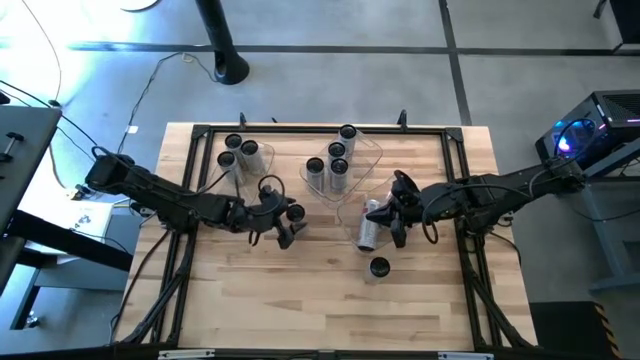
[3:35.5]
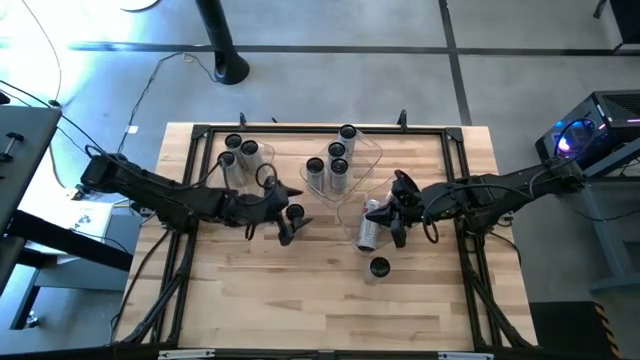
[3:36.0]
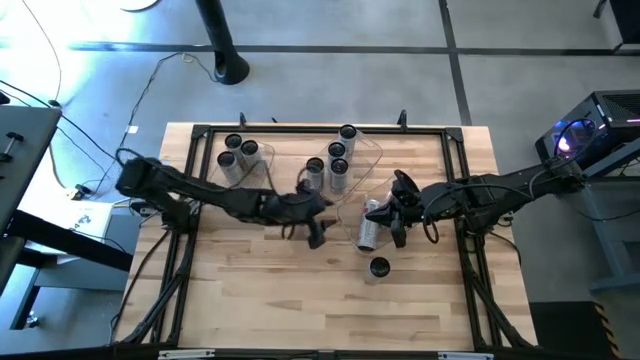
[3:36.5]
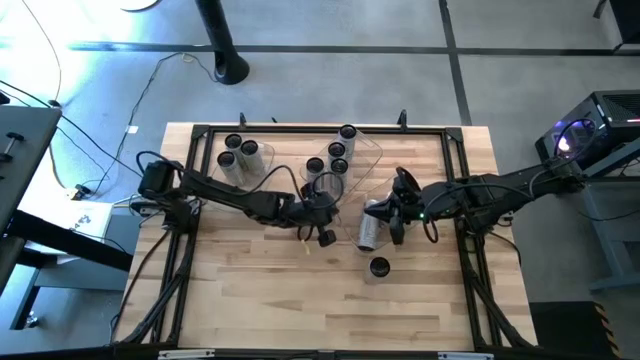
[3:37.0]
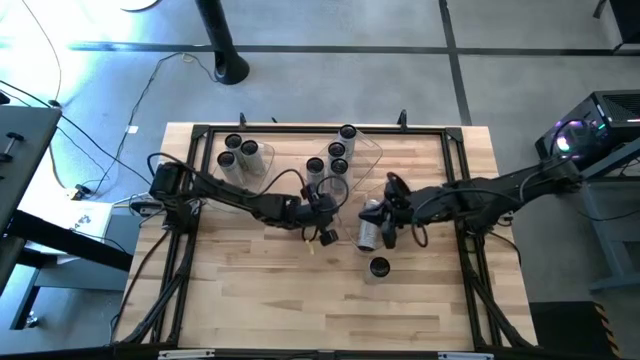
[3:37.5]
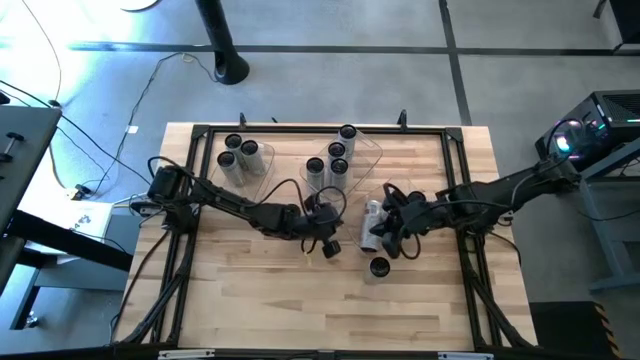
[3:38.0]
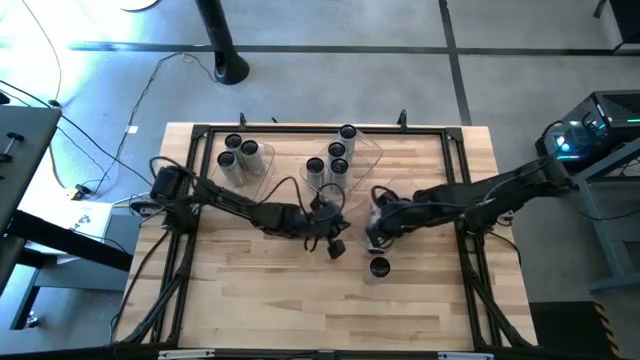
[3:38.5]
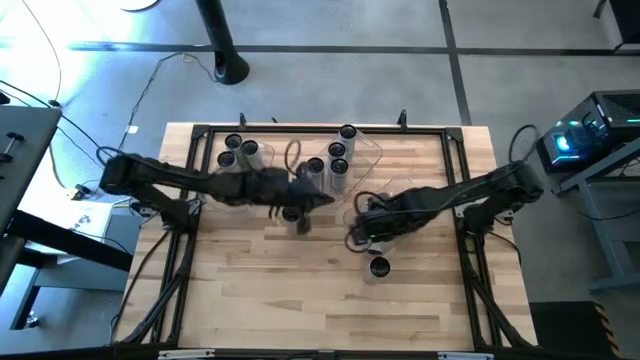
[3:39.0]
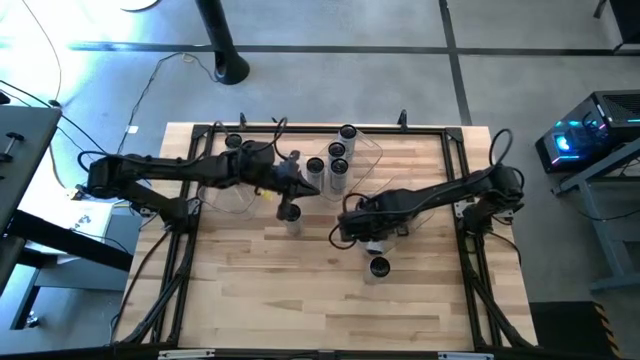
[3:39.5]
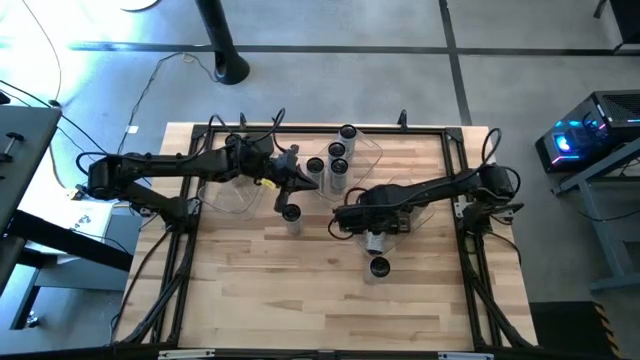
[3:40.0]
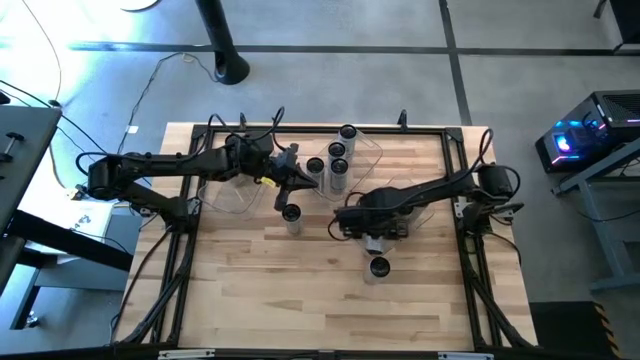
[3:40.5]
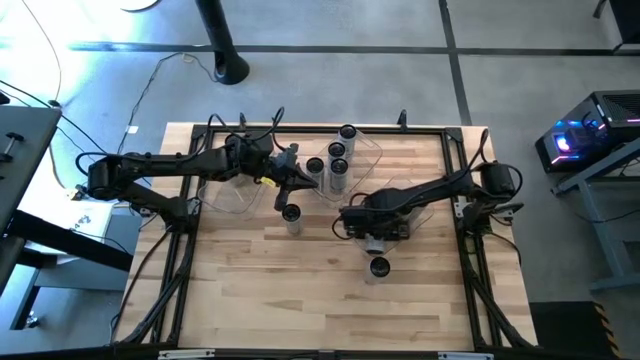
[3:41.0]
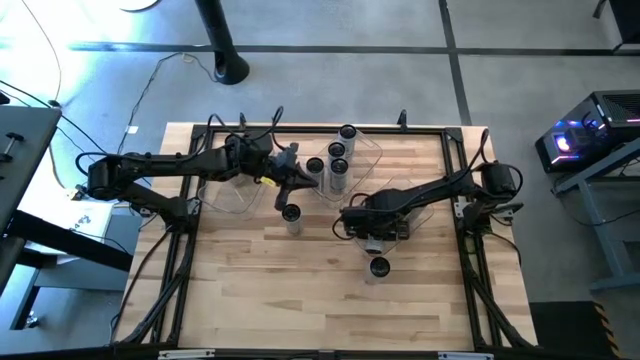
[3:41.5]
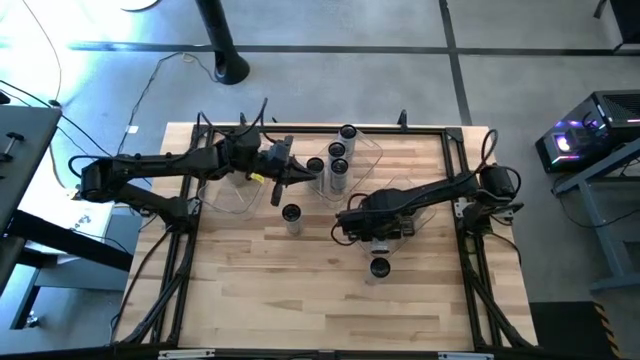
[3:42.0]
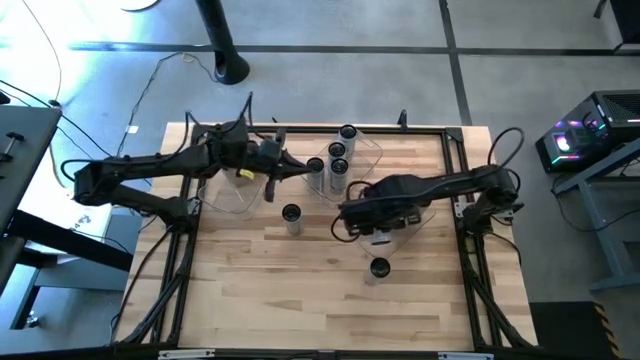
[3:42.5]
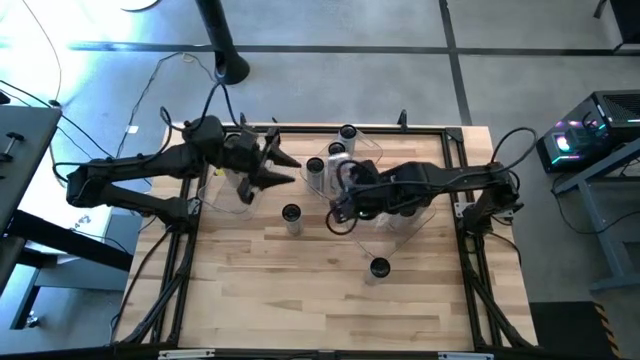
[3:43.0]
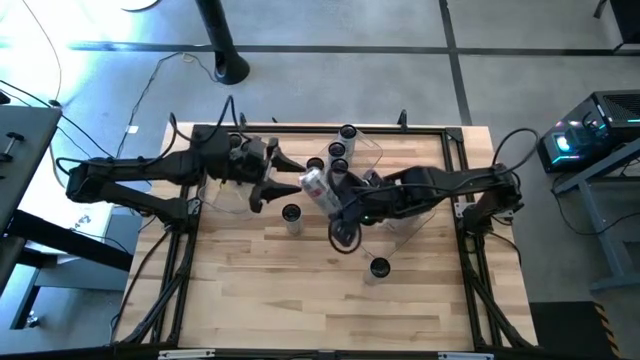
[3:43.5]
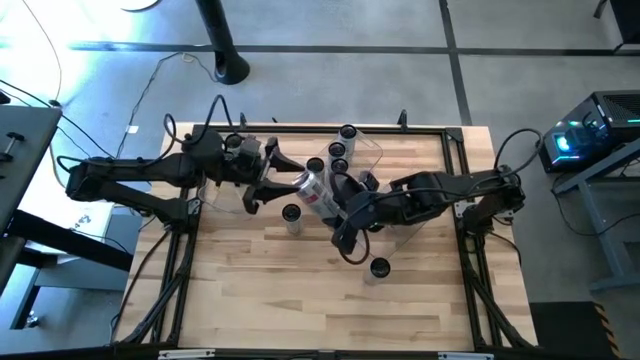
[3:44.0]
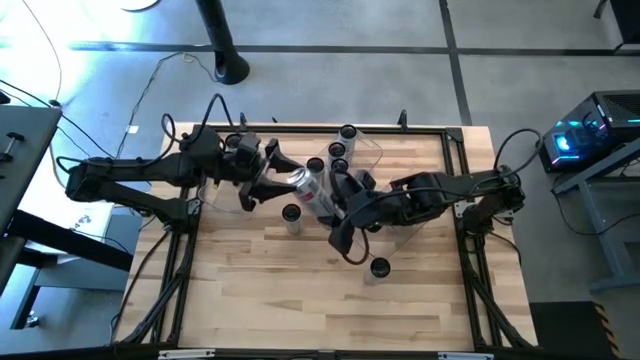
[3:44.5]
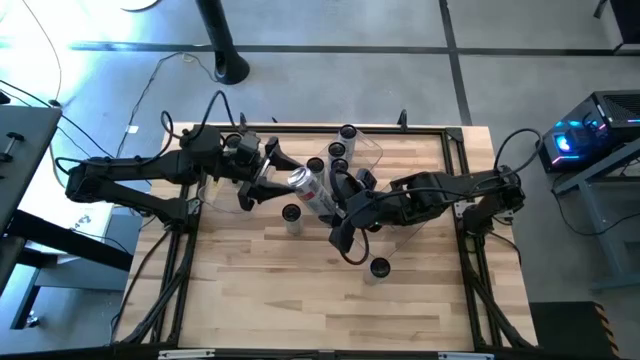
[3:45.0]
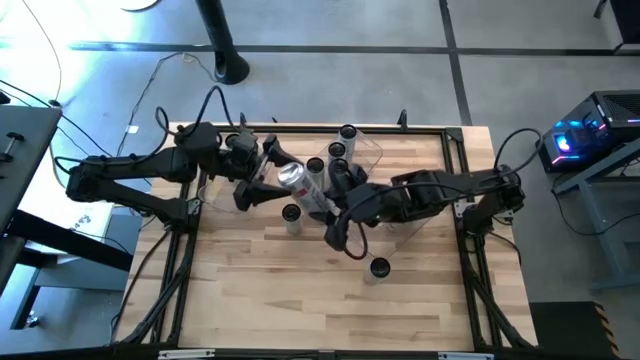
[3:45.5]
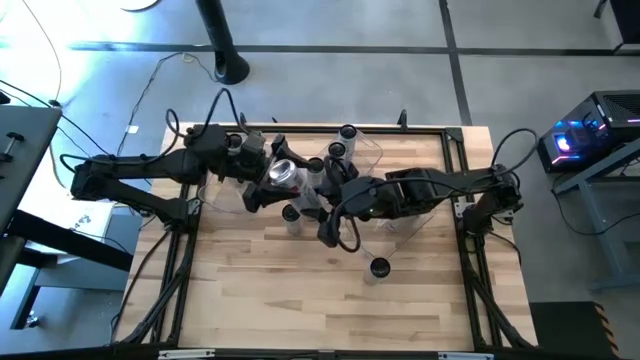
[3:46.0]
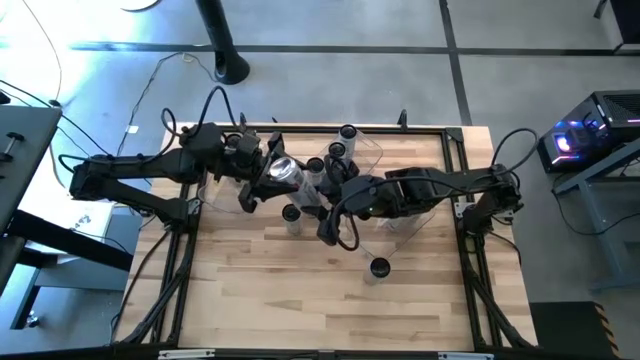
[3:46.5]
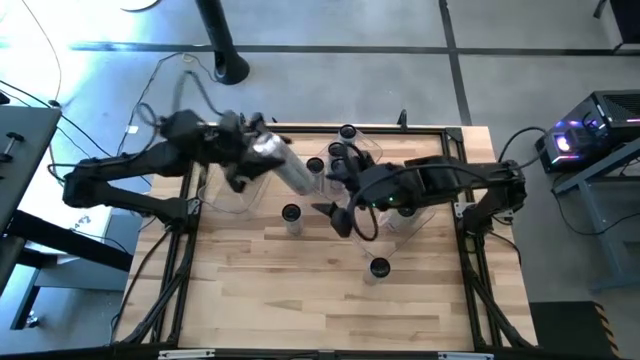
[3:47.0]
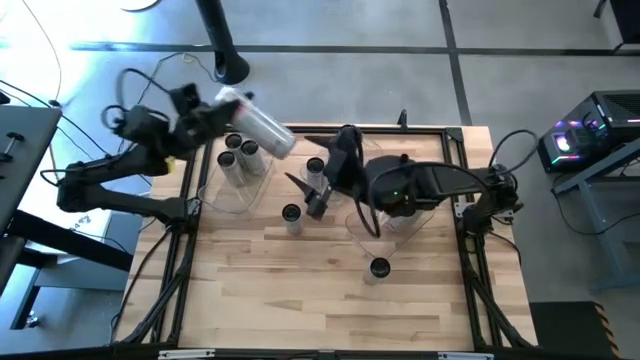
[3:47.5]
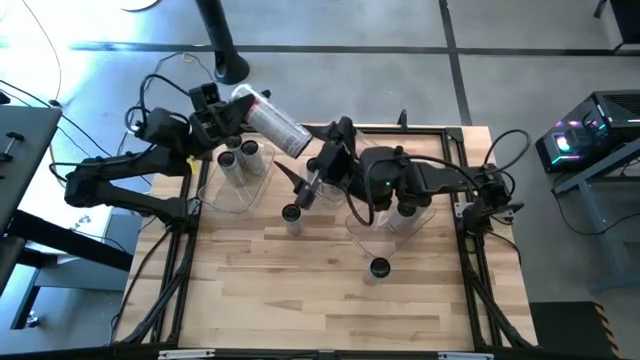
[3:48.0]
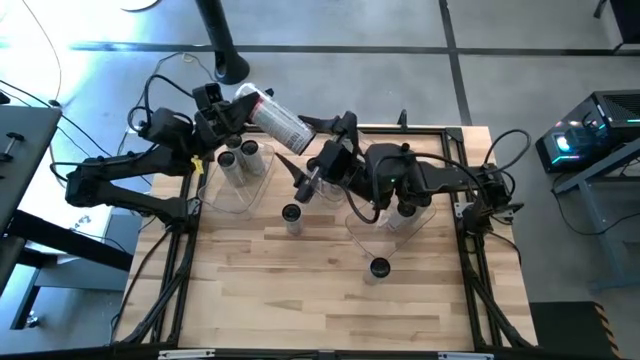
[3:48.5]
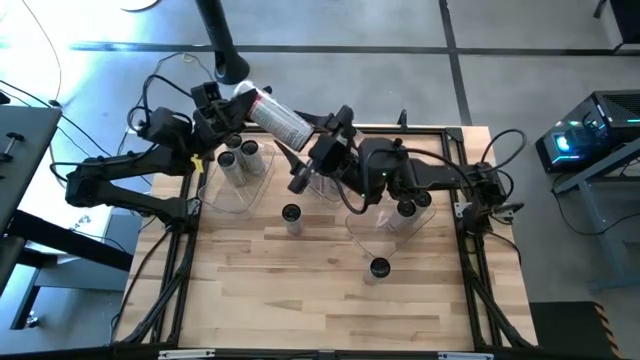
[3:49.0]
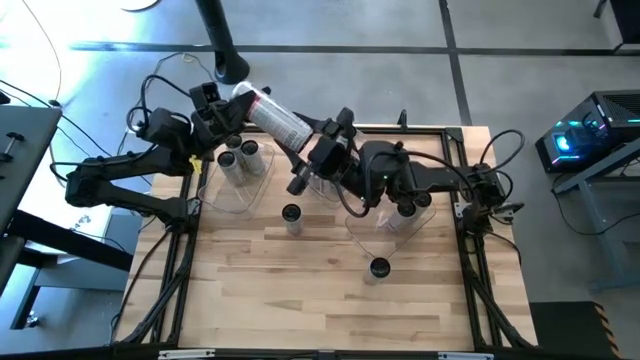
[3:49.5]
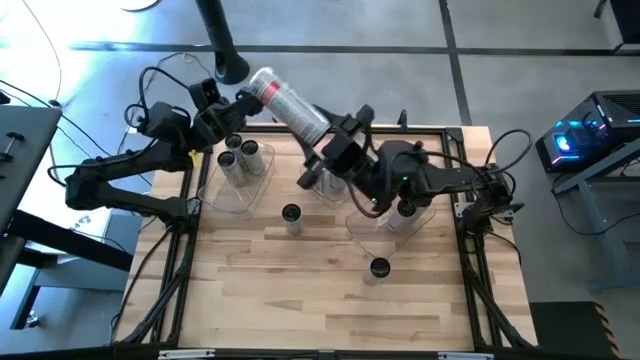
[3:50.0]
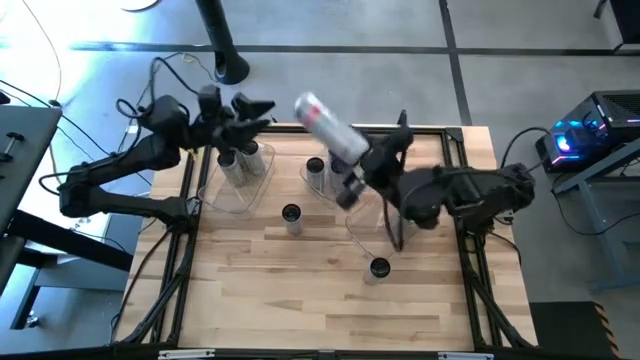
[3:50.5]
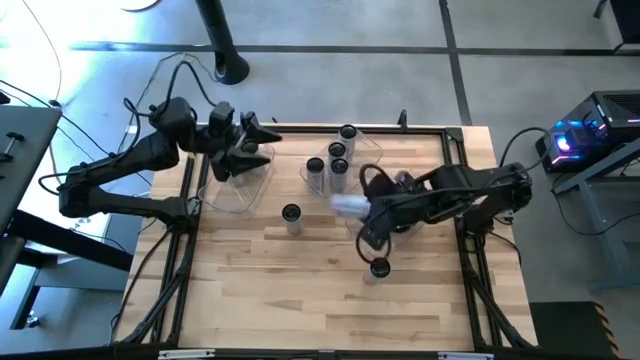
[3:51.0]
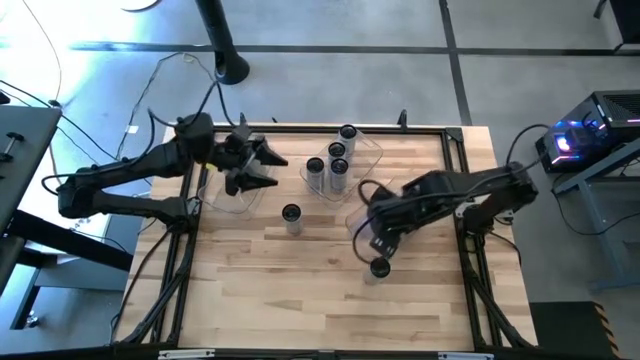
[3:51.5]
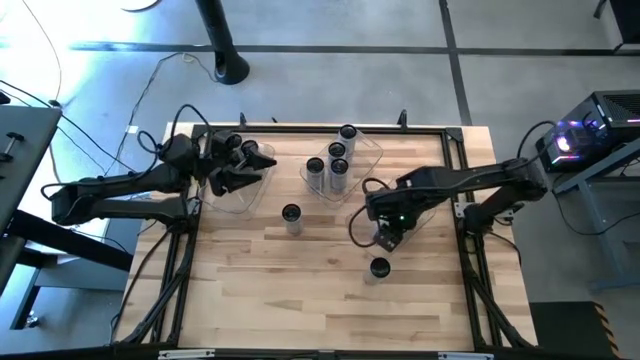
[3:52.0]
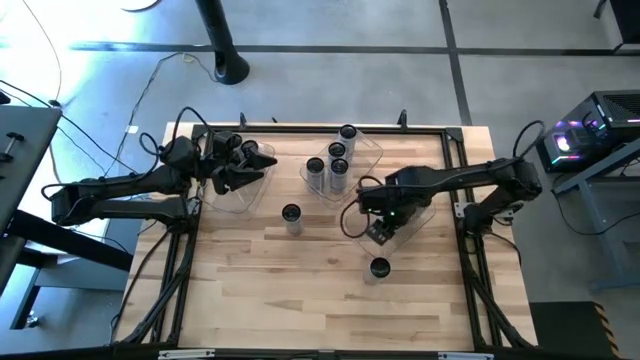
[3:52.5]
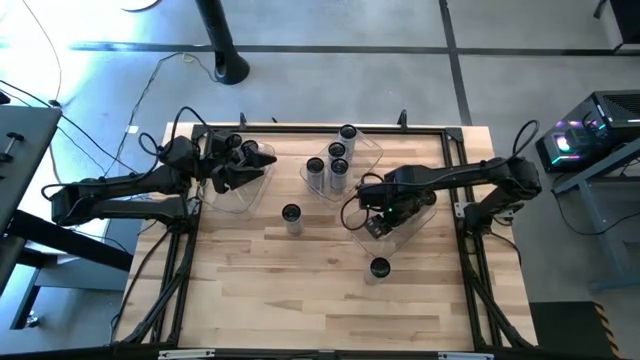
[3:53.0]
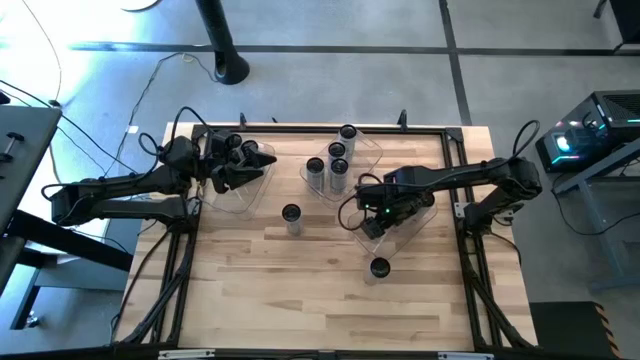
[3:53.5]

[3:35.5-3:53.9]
Task: Sort soda cans
Adjust the white-pink soda can in the top right transparent bin

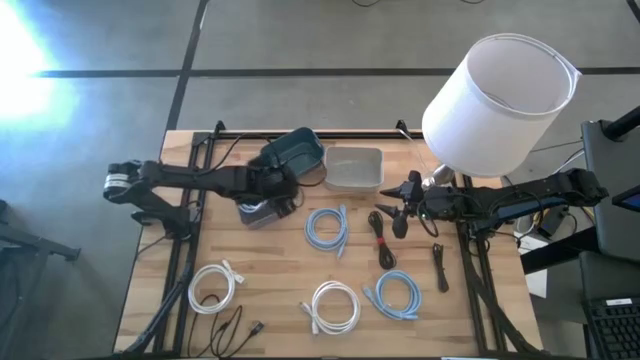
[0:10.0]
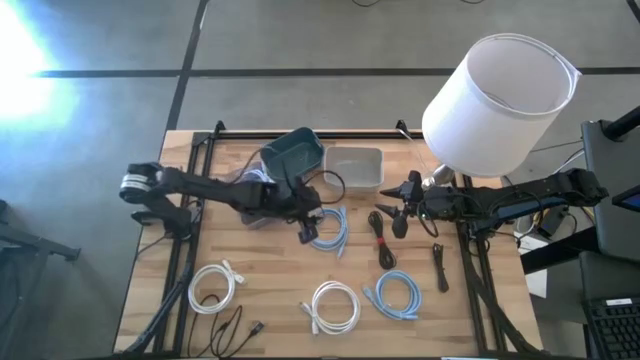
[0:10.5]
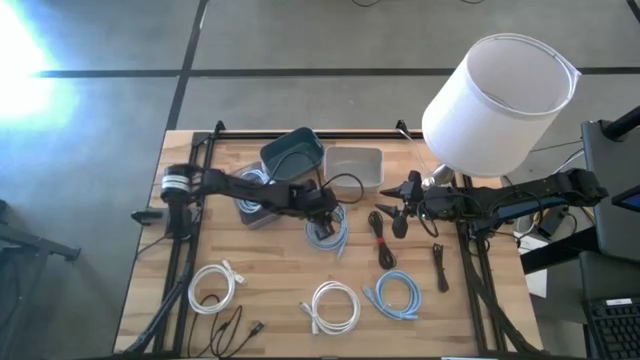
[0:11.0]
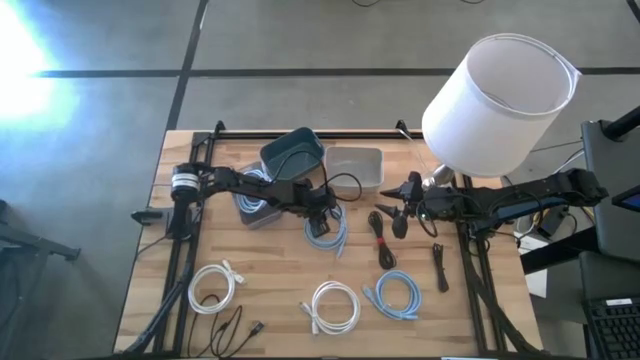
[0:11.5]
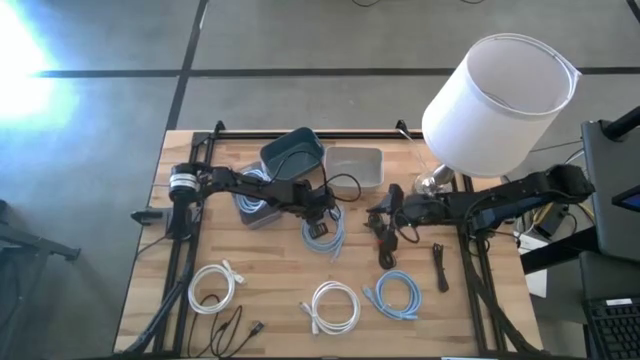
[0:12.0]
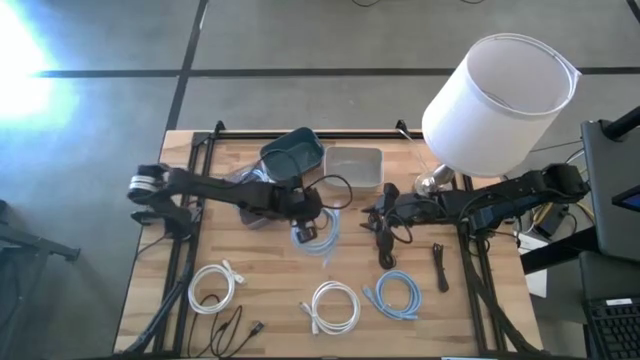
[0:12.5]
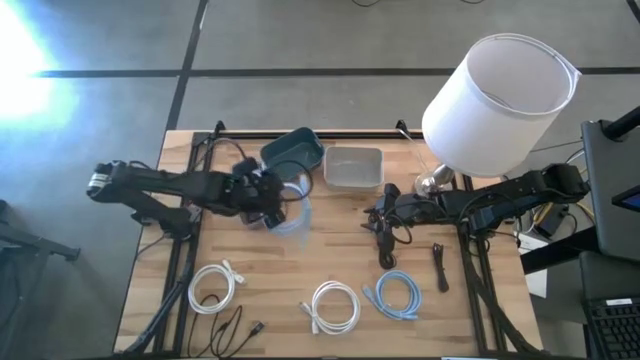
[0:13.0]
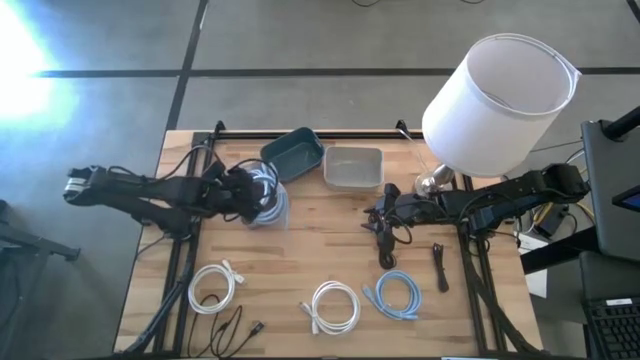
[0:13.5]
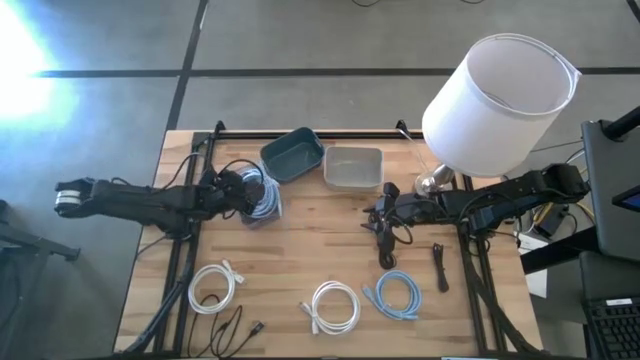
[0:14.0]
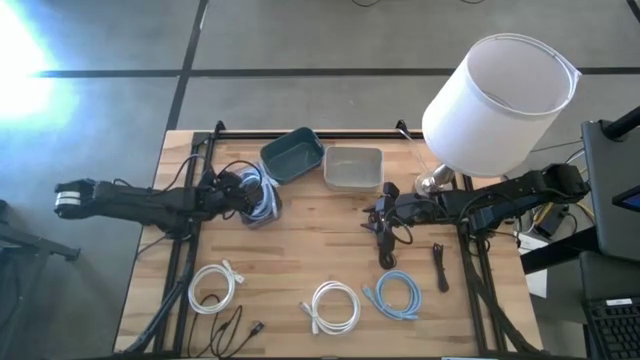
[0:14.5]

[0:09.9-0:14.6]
Task: Pick & Place USB Port
Put the top blue HDMI cable into the gray bin
